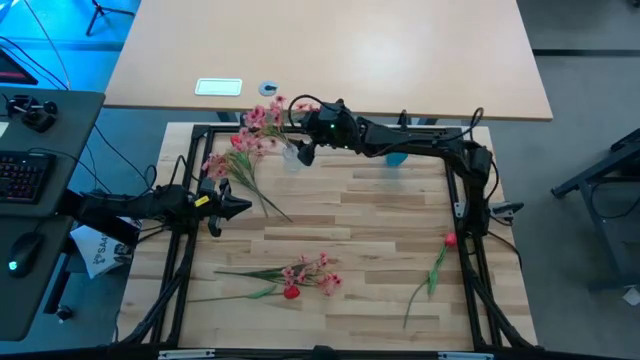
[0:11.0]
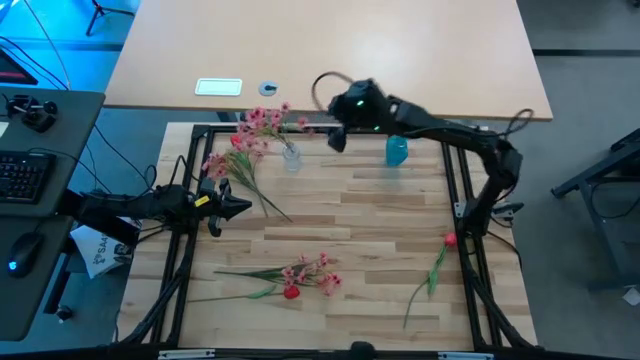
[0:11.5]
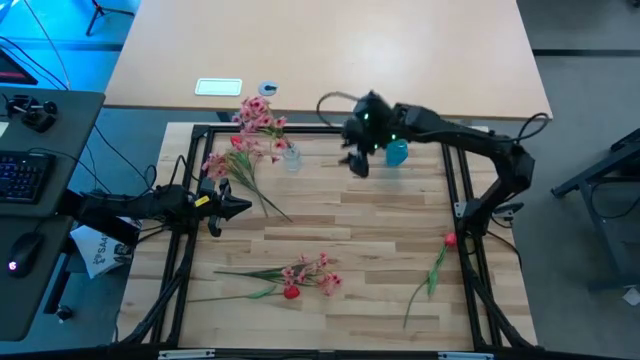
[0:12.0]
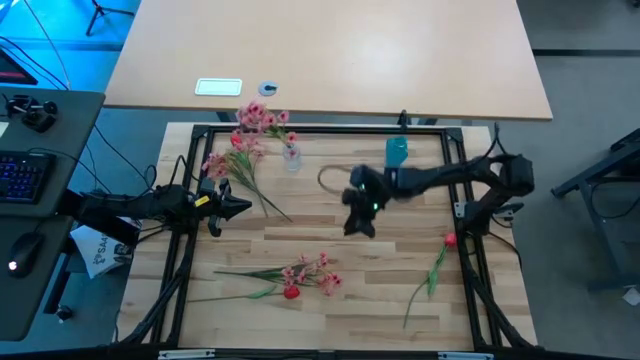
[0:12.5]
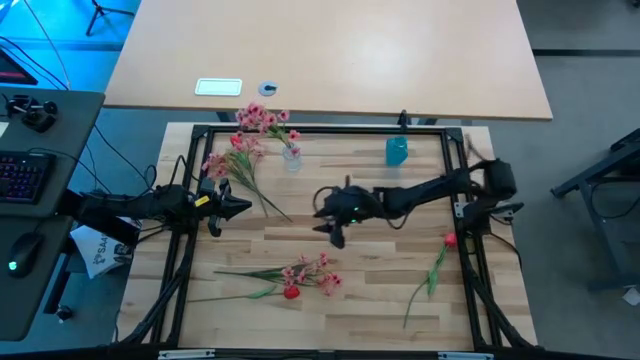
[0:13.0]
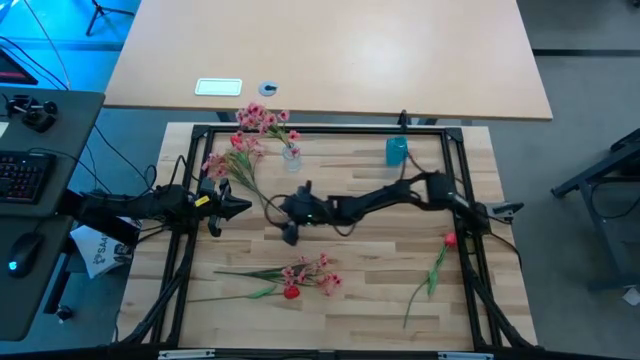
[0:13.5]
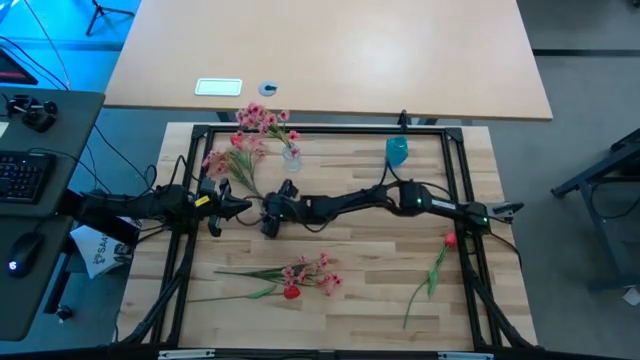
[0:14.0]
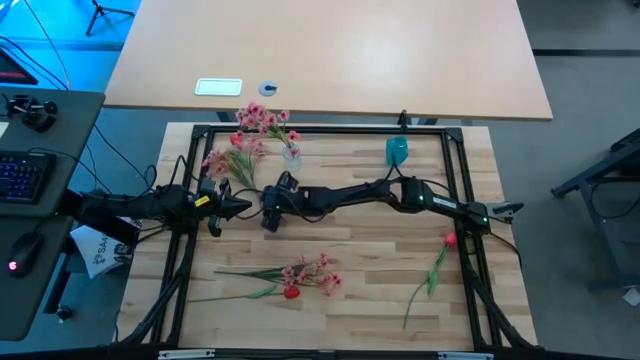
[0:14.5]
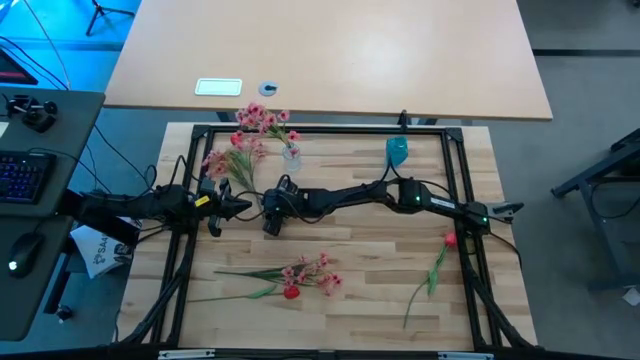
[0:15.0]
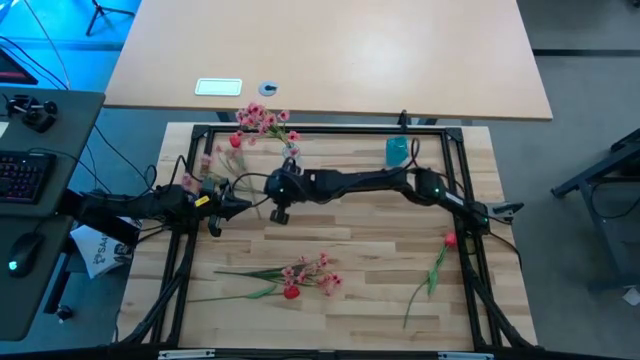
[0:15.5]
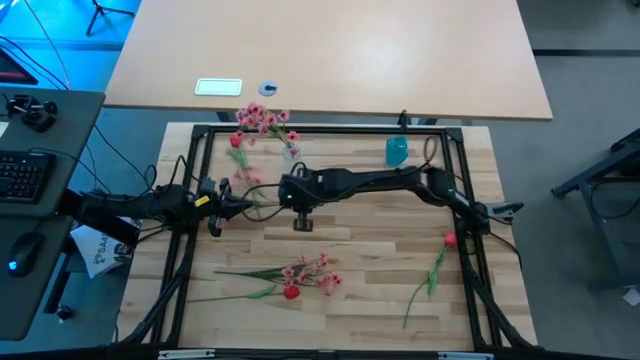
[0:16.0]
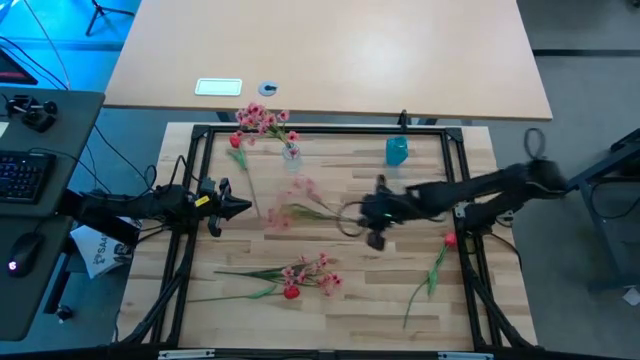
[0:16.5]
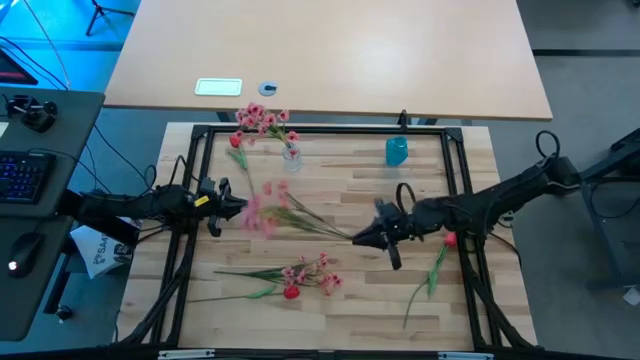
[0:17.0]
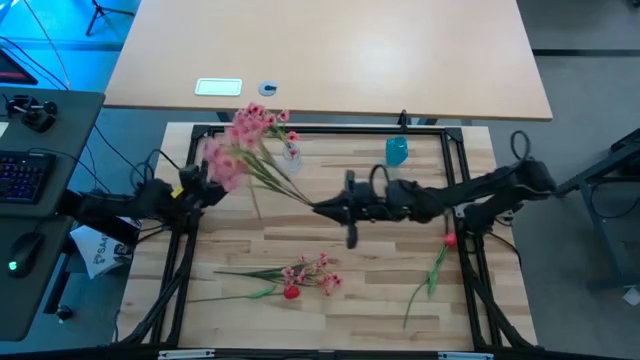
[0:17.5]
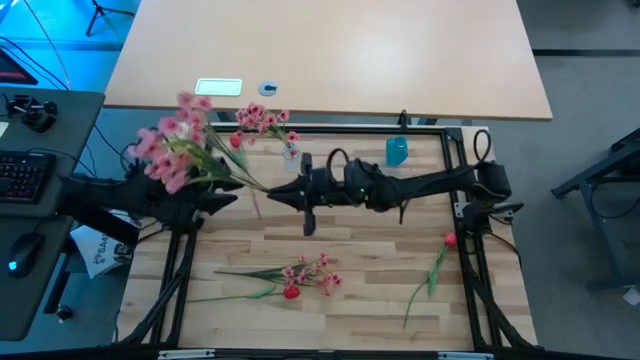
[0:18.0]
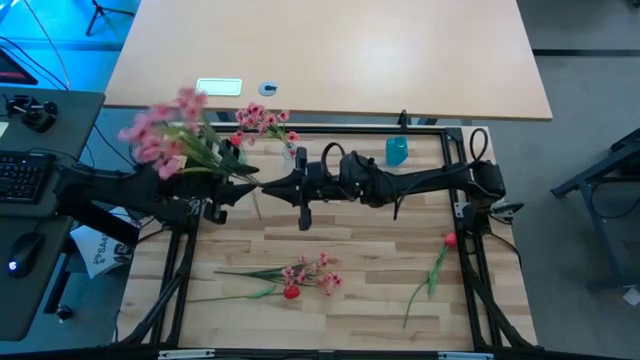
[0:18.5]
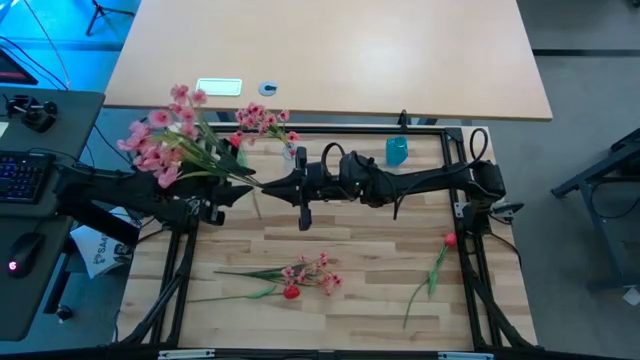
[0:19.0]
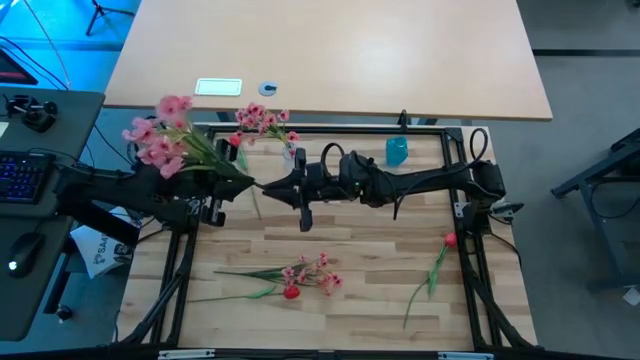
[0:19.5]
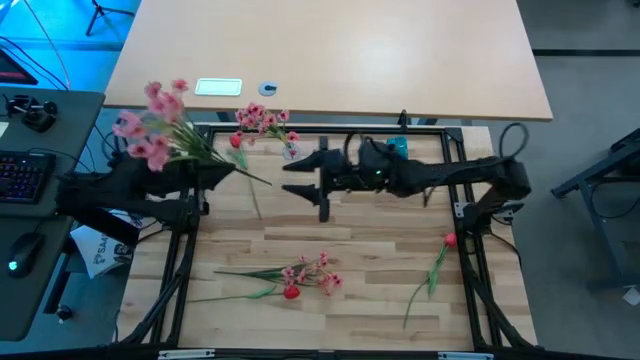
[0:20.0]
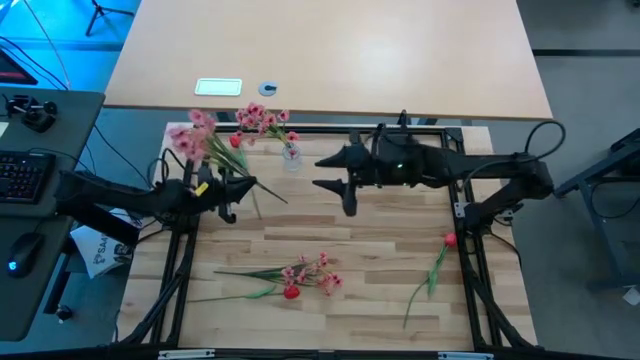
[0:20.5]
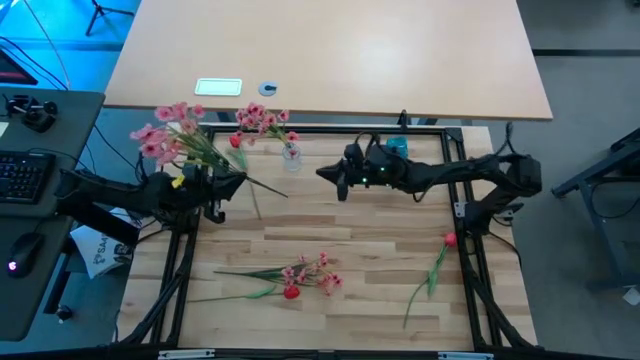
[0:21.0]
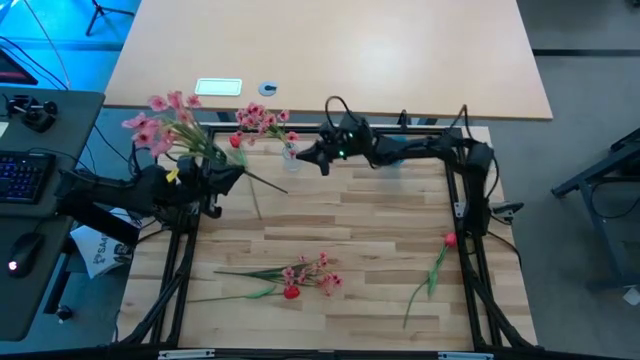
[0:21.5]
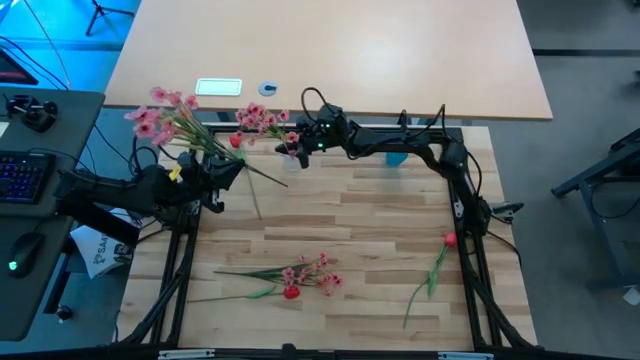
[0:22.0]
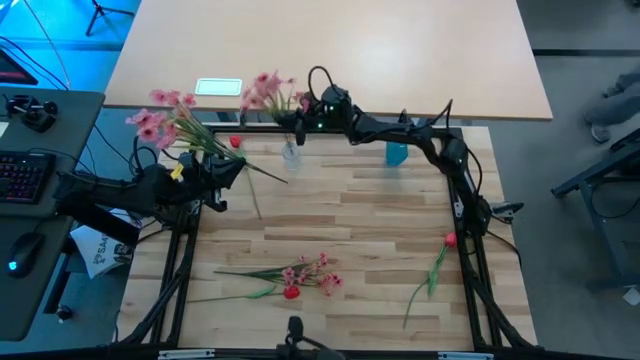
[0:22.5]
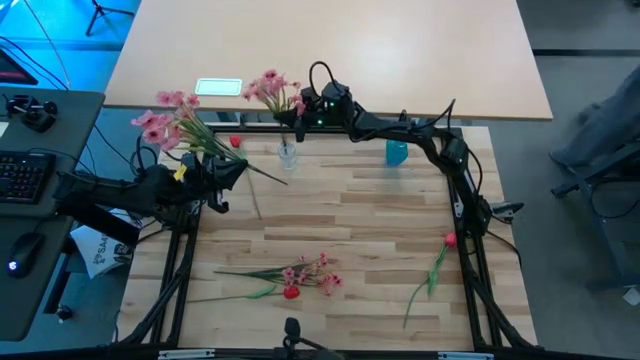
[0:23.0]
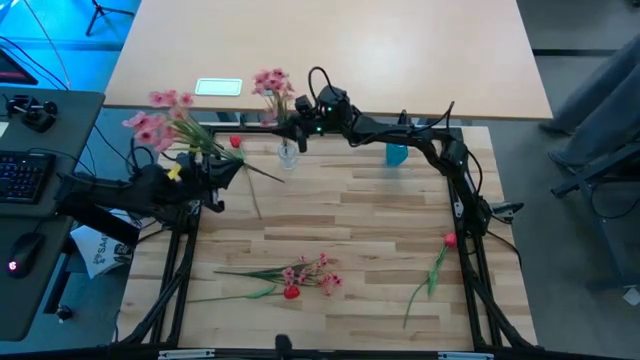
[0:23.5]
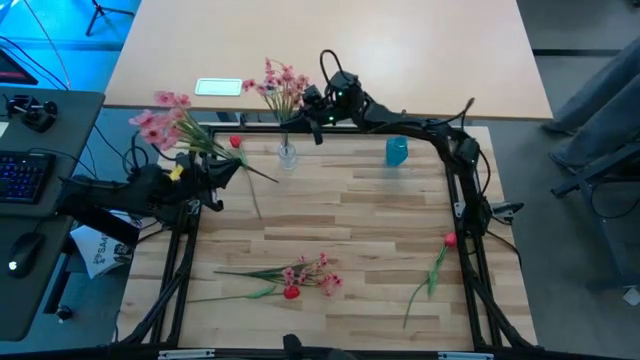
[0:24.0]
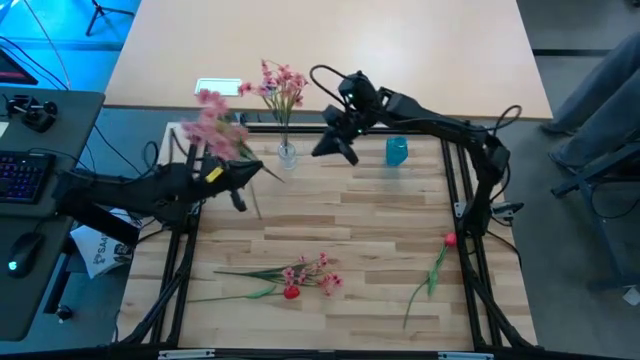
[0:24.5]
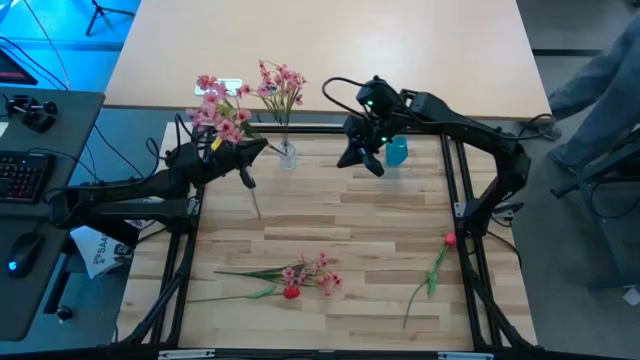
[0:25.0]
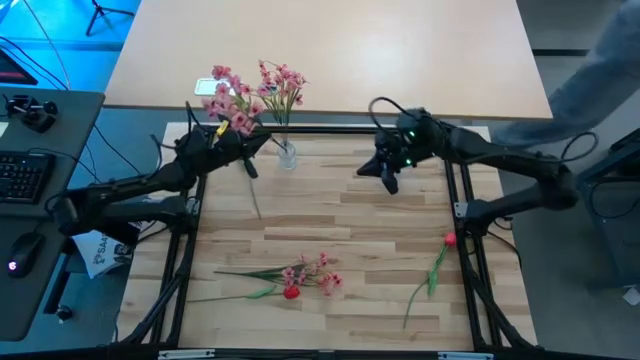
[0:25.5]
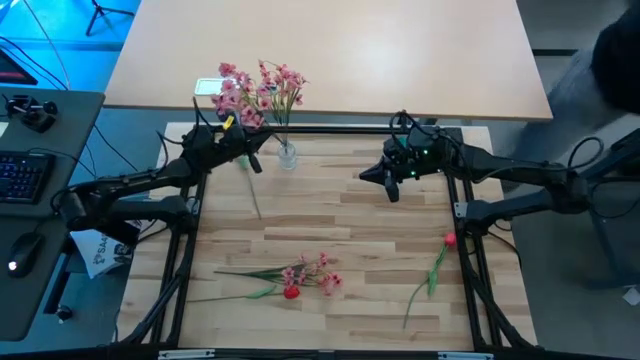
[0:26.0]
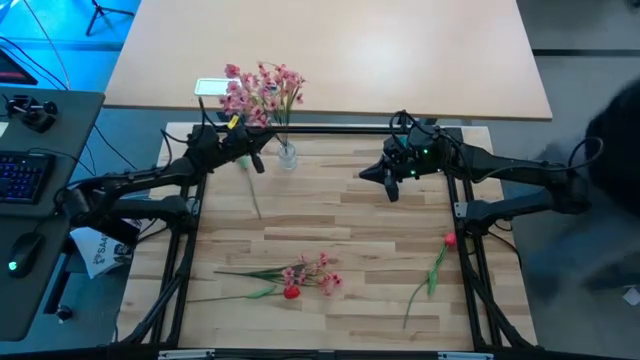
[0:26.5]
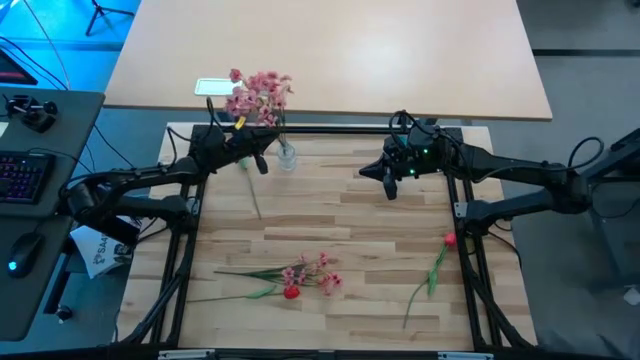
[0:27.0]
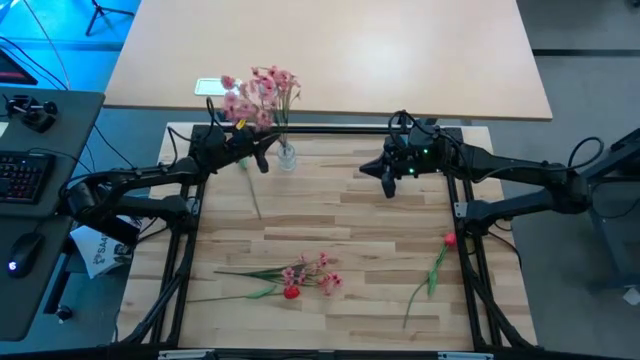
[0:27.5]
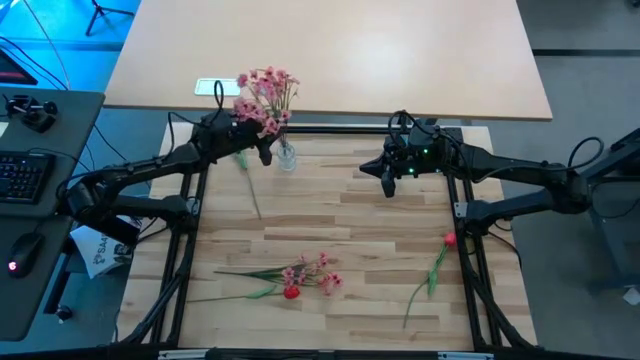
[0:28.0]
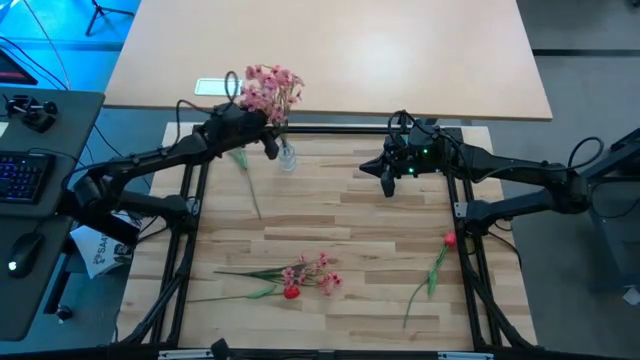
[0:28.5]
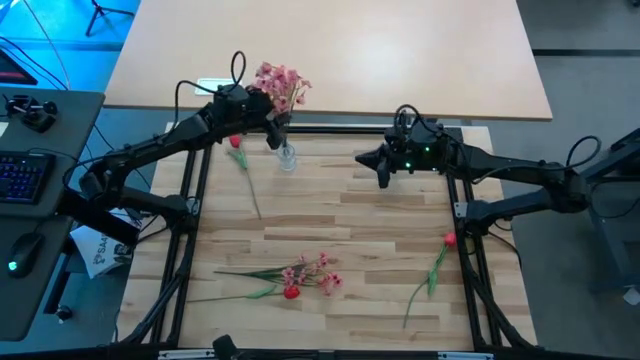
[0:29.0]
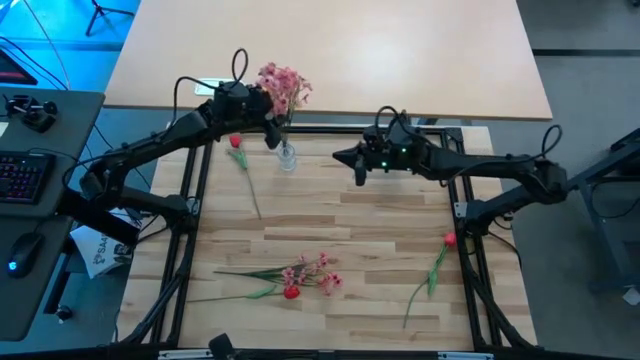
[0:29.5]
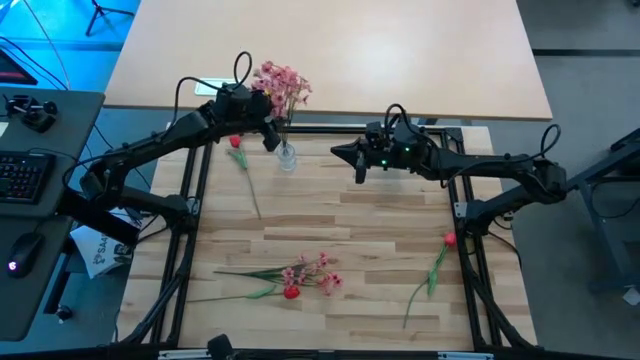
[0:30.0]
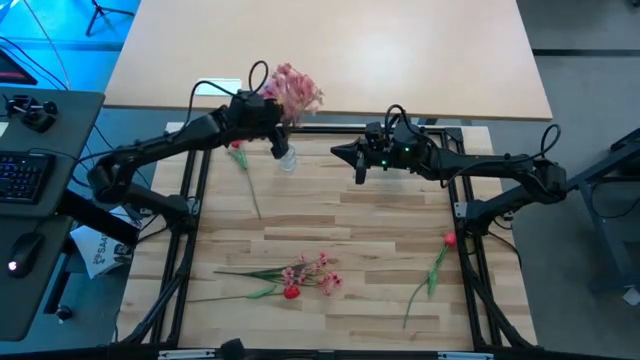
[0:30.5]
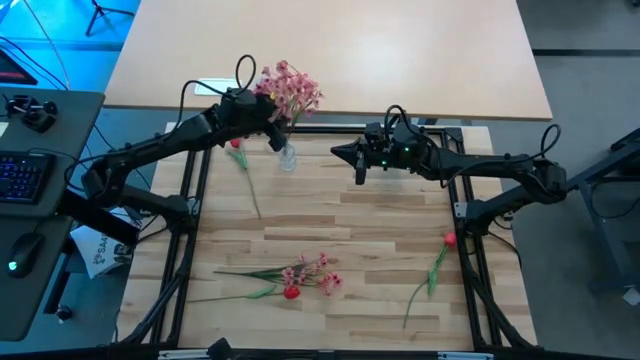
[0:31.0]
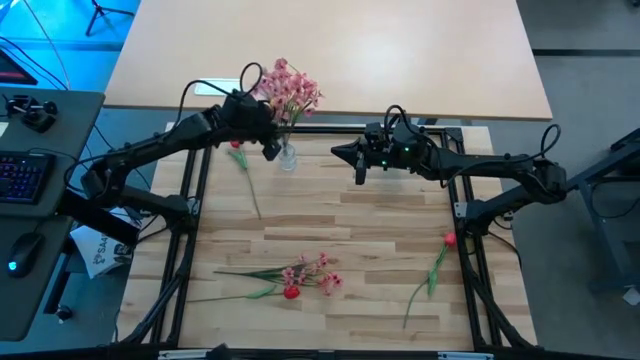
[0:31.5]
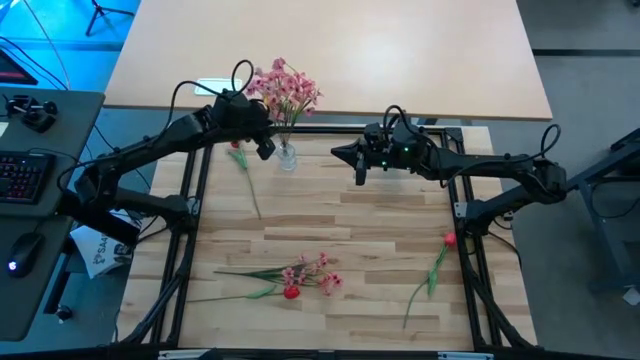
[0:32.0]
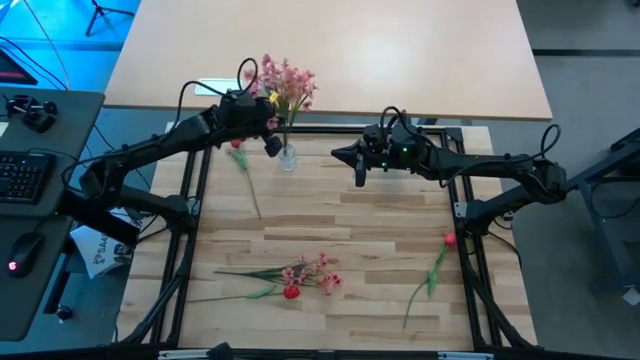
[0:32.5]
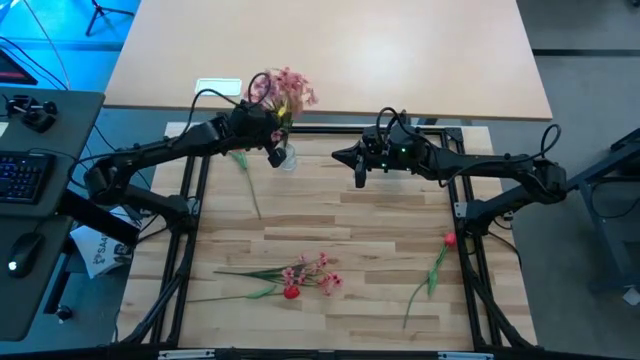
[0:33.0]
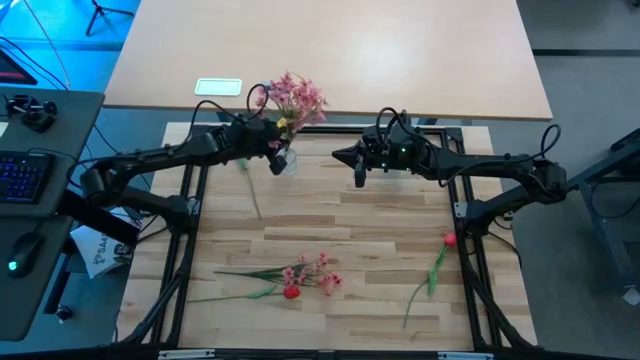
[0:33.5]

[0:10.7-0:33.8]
Task: Sort flowers into vase by color
Put the top pink flower into the transparent vase
